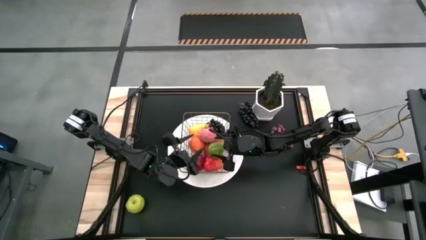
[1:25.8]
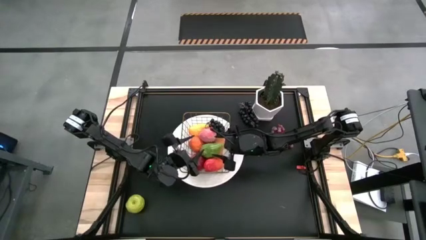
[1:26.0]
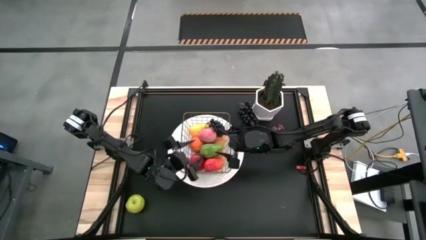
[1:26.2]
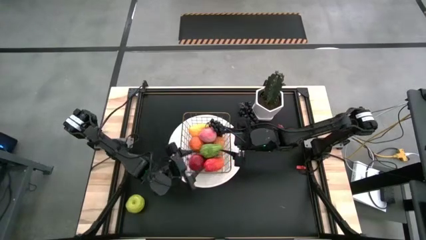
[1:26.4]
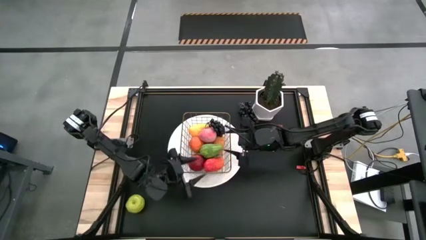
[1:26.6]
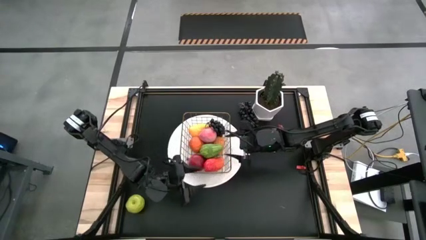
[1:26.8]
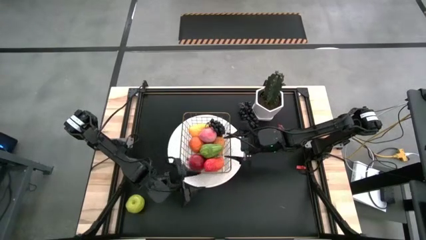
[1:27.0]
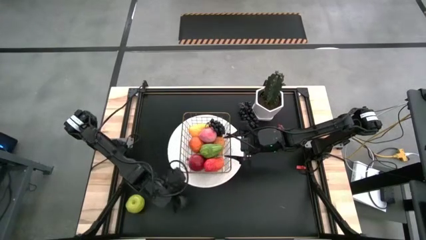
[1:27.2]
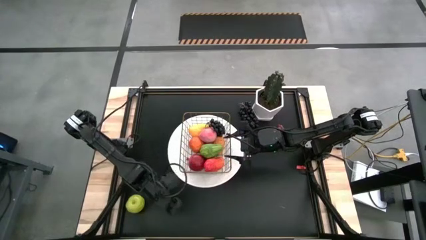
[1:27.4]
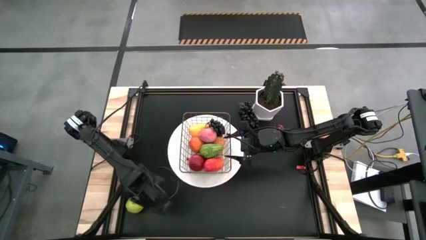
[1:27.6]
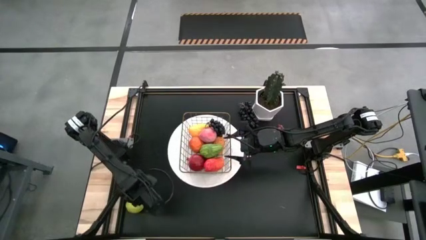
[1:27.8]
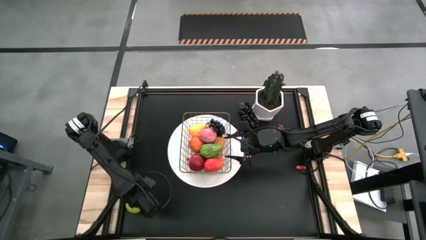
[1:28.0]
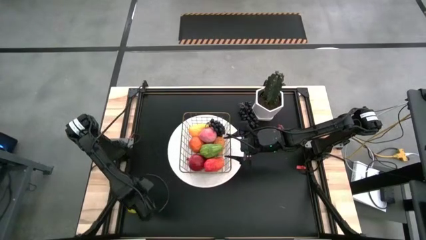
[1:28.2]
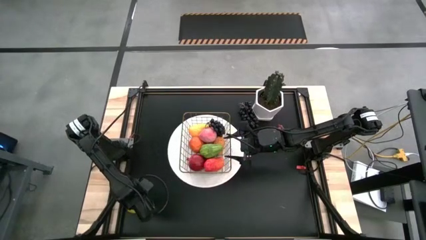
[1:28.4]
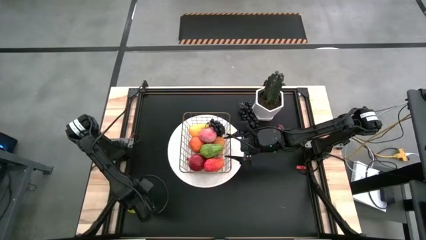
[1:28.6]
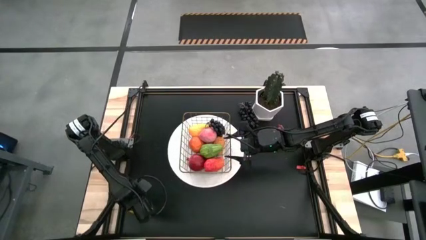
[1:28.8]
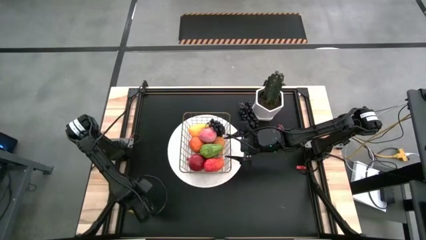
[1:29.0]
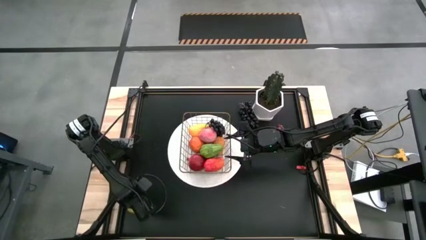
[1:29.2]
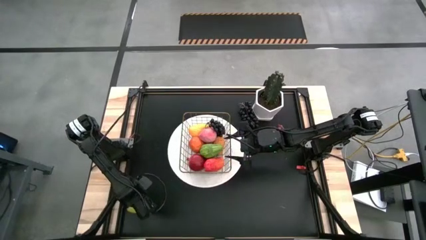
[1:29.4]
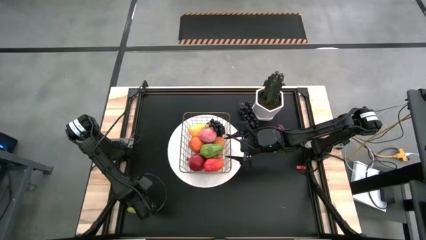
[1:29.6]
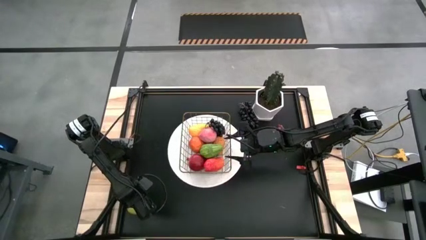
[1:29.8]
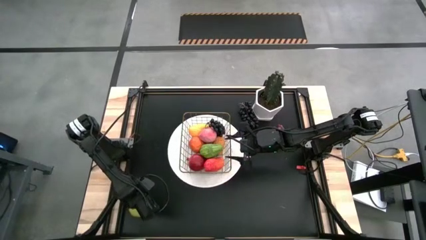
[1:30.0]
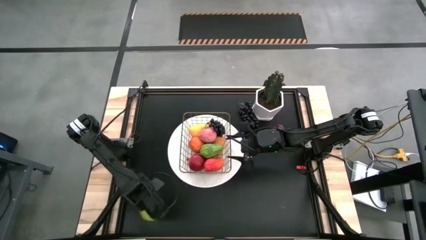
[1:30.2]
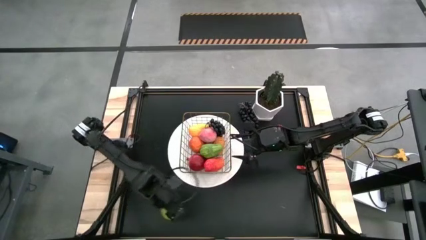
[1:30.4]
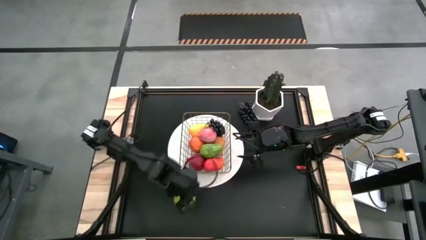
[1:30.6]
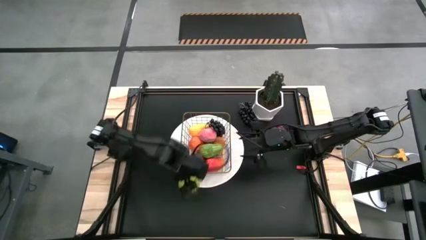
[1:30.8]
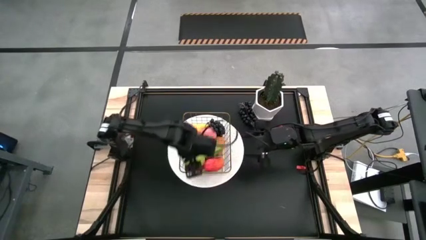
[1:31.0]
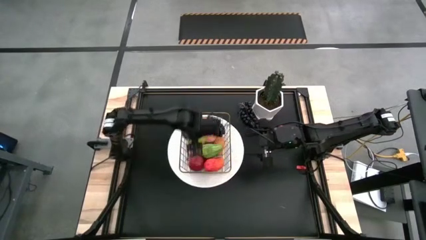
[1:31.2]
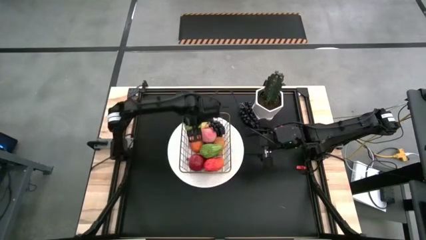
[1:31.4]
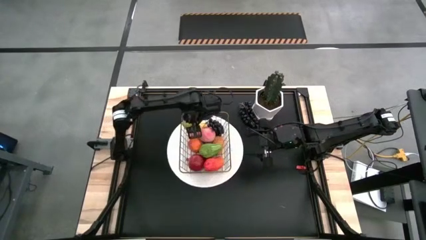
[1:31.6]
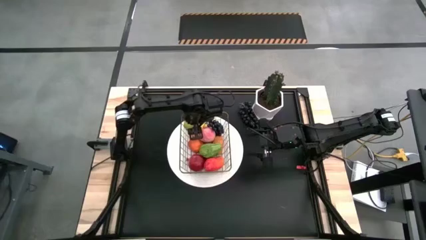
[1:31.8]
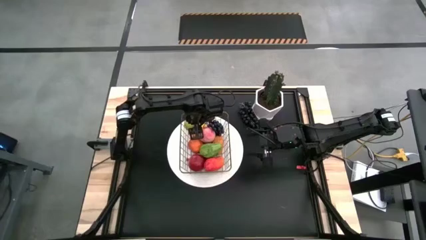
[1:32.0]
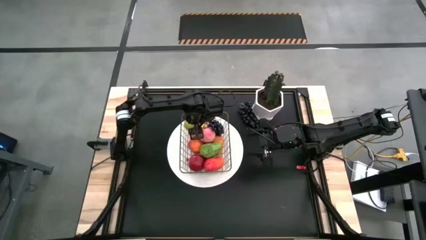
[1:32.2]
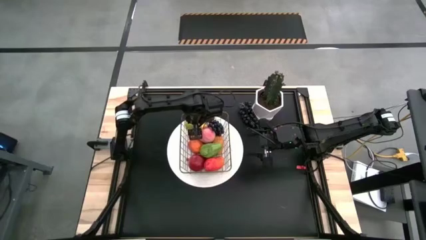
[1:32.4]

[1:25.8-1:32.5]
Task: Build produce basket
Put the green apple into the wire basket

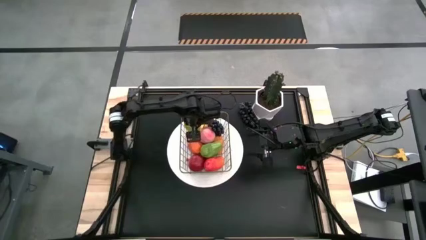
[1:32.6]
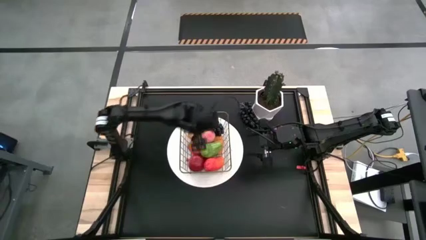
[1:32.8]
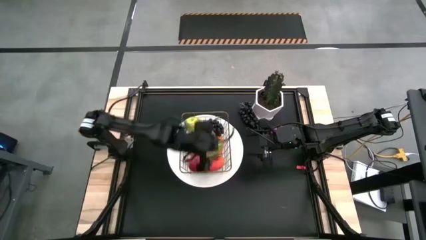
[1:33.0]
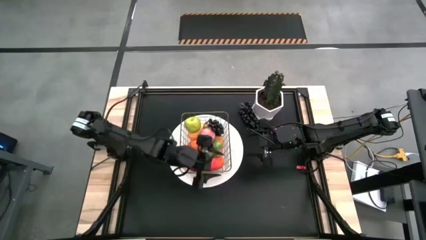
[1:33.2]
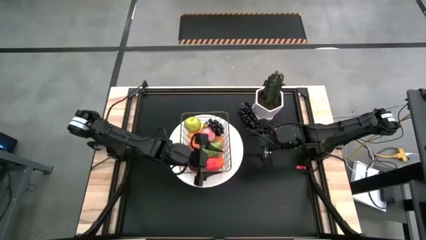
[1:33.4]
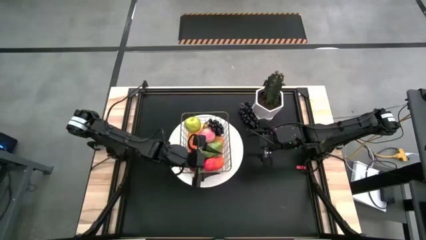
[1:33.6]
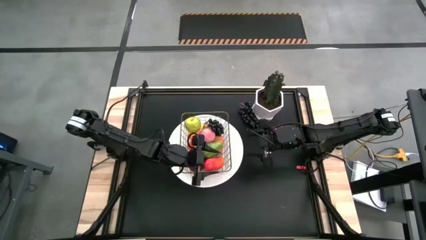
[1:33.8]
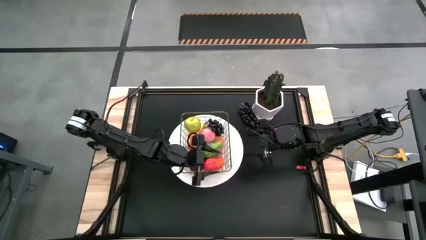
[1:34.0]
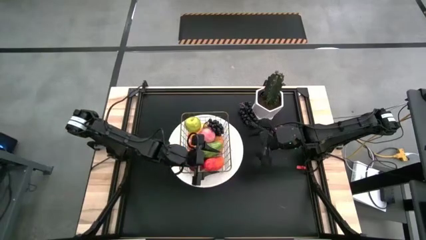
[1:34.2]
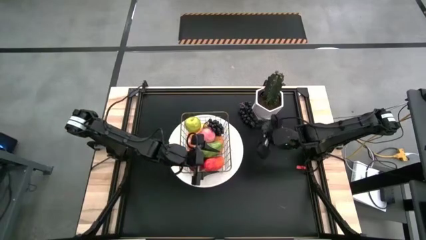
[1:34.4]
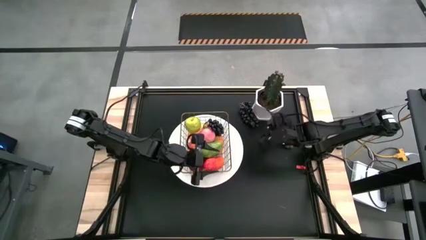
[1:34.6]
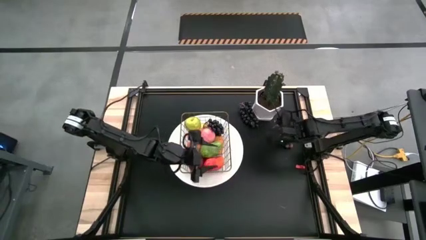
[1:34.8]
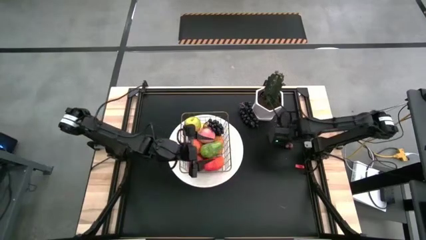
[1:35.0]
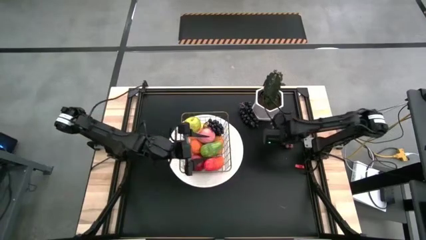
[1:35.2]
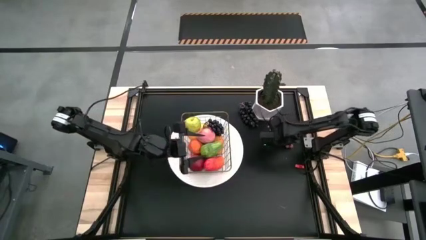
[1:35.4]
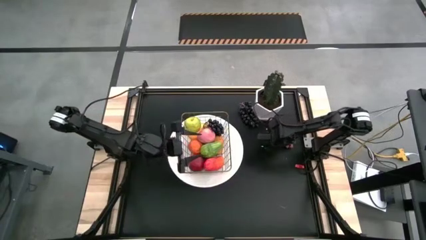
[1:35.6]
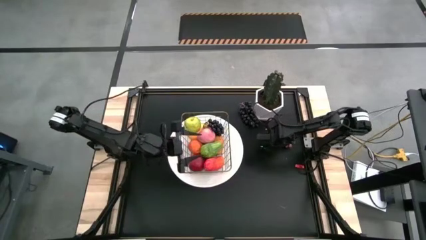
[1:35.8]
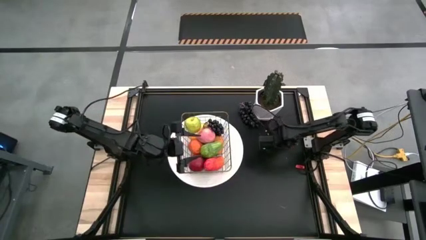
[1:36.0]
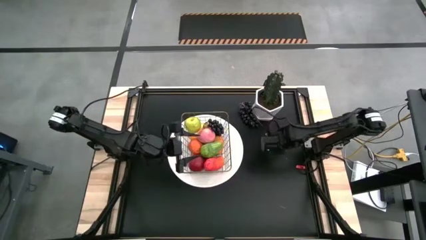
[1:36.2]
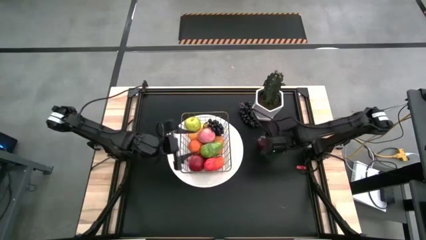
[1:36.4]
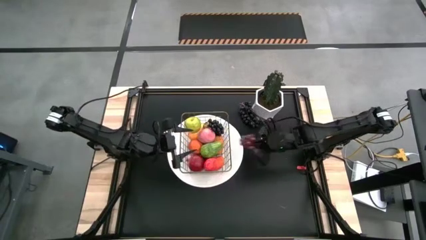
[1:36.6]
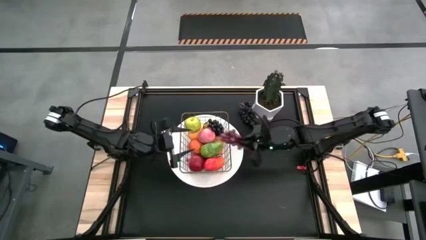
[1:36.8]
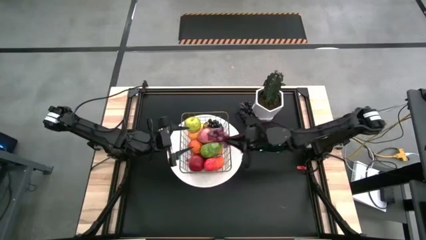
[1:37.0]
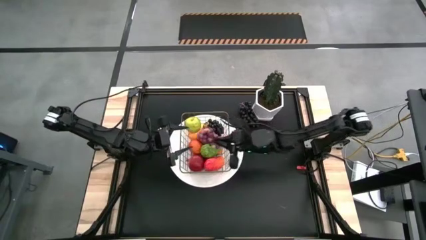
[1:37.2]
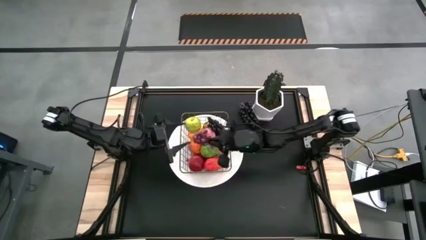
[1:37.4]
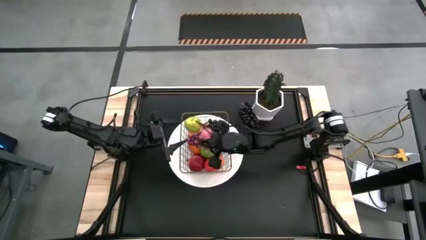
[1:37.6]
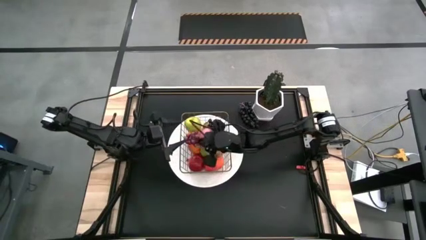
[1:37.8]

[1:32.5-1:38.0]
Put the red grapes into the wire basket

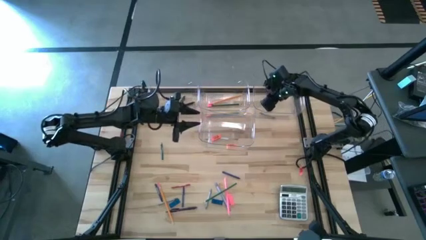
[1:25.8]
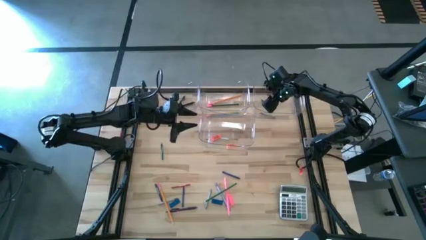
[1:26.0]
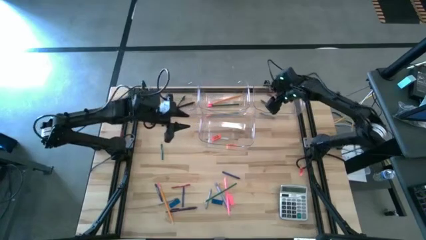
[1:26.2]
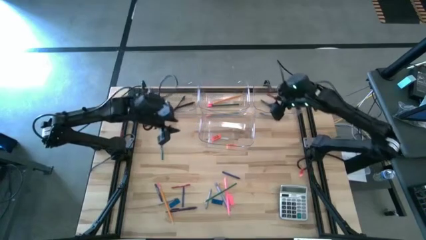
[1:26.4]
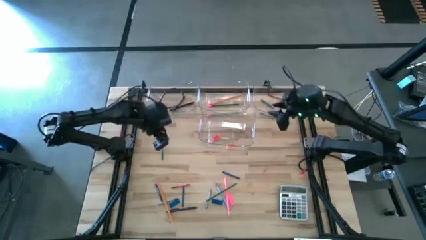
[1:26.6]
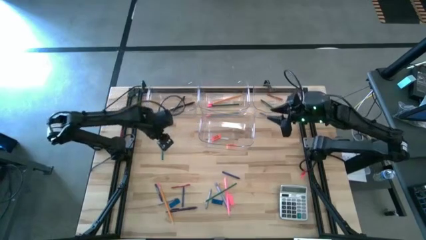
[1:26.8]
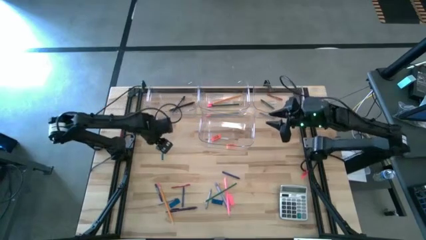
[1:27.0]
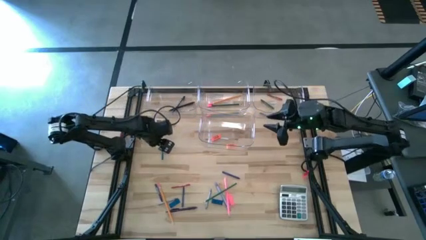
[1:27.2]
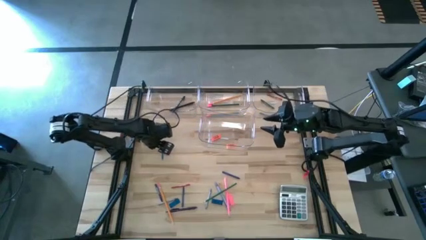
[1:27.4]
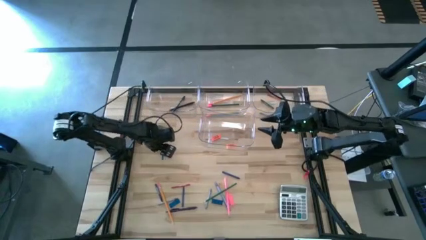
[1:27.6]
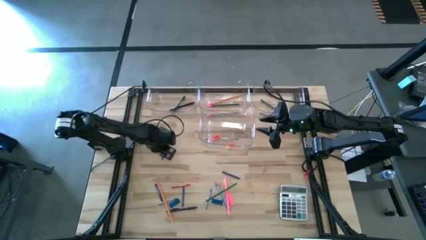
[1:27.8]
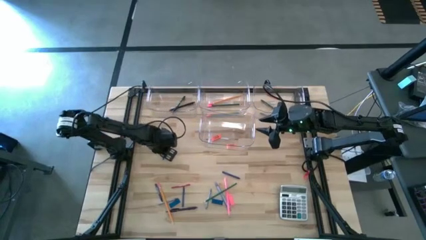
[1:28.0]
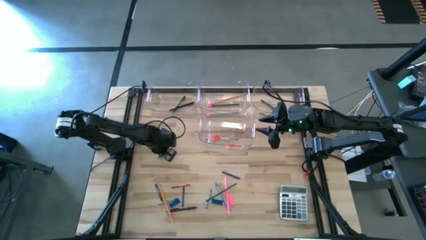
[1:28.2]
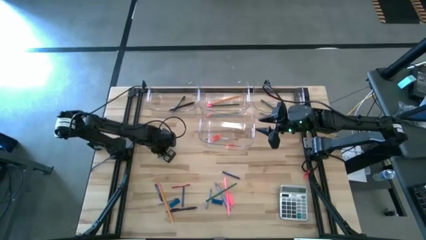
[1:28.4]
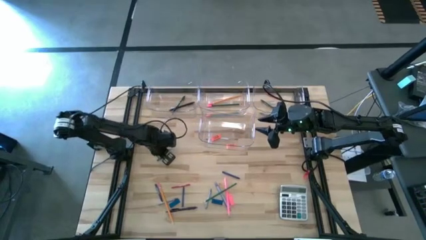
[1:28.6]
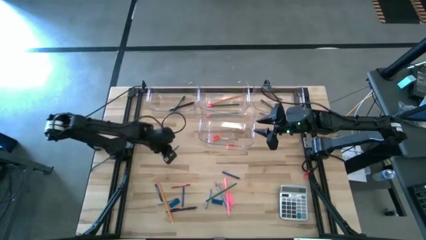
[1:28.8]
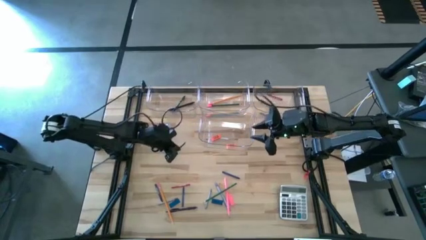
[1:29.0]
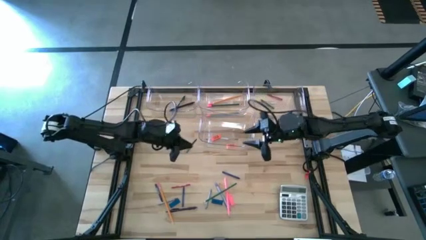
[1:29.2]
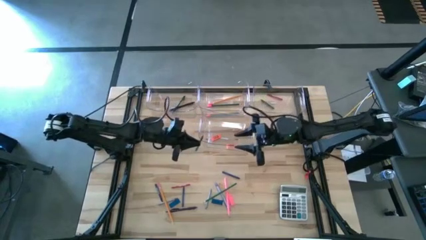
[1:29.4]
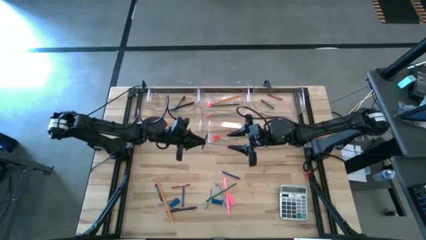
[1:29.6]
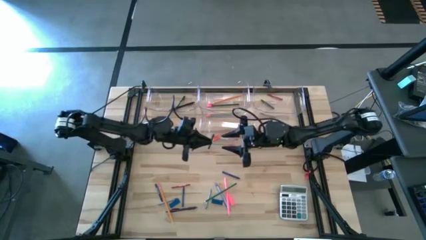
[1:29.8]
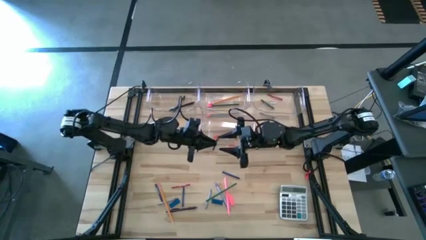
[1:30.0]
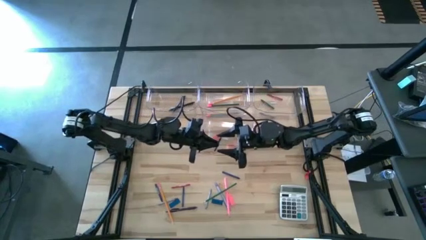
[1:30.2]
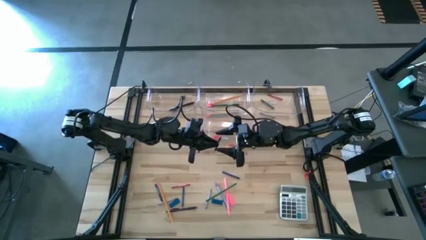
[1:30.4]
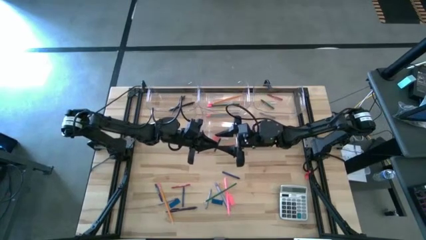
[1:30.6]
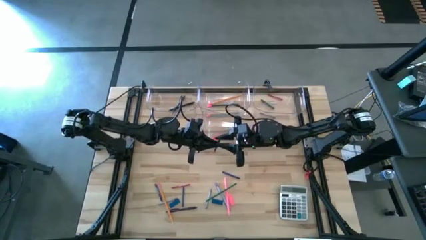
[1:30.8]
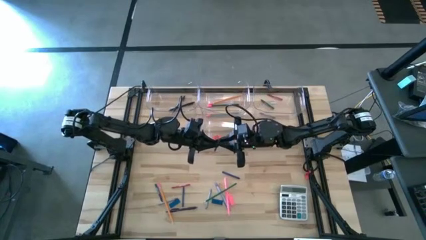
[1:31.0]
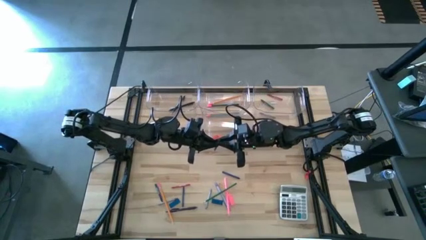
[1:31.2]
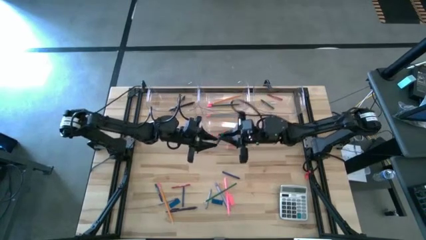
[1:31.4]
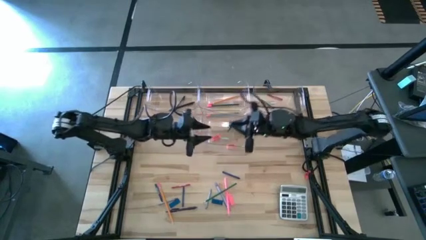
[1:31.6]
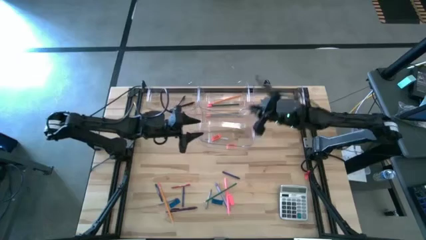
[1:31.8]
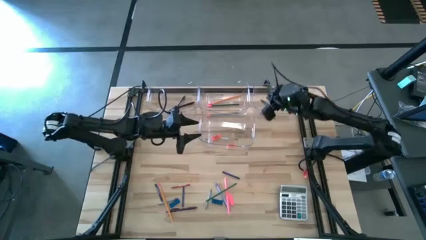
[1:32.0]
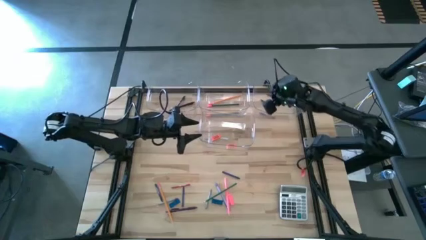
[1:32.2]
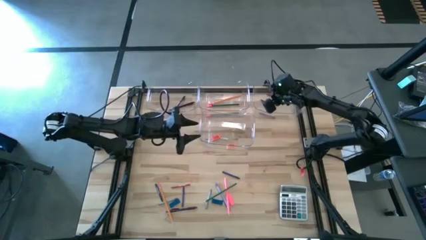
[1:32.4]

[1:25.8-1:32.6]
Task: Sort crayons/erasers/pens/pencils in bins
Put the green crayon into the top right transparent bin
